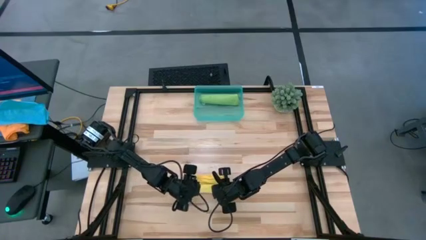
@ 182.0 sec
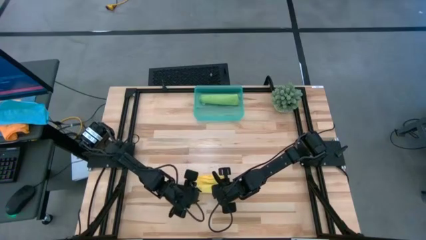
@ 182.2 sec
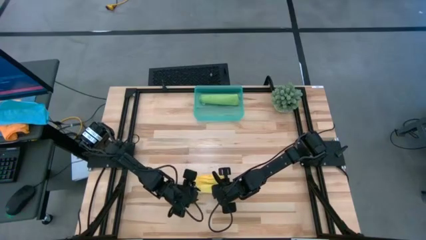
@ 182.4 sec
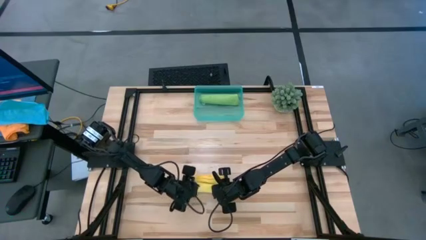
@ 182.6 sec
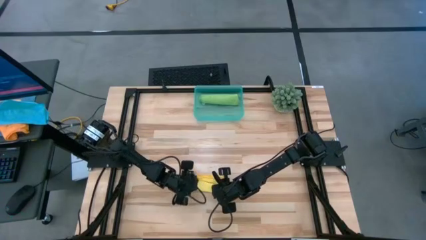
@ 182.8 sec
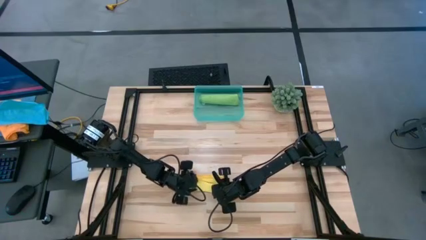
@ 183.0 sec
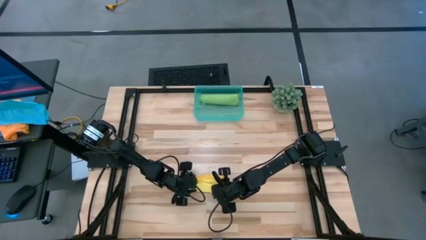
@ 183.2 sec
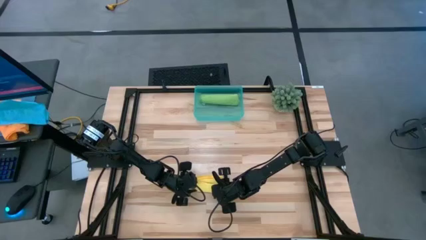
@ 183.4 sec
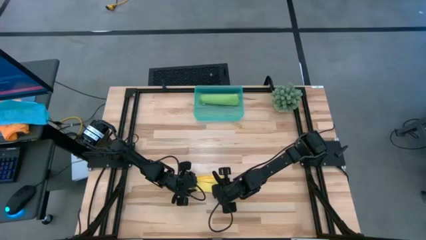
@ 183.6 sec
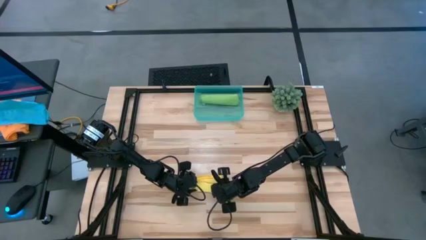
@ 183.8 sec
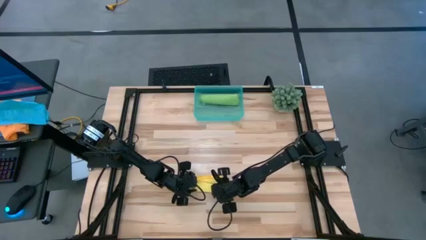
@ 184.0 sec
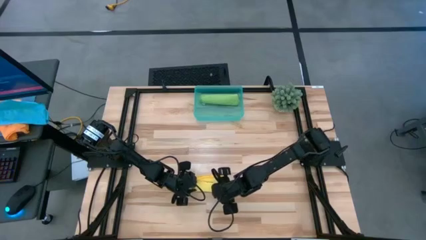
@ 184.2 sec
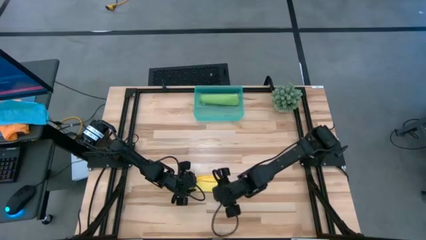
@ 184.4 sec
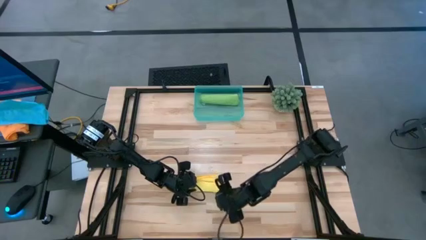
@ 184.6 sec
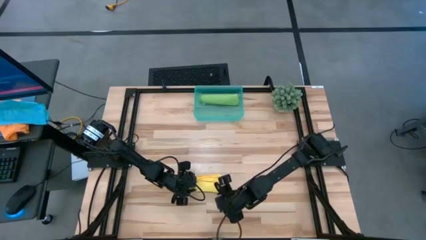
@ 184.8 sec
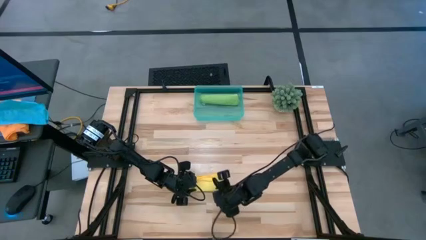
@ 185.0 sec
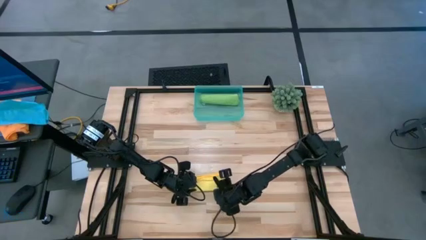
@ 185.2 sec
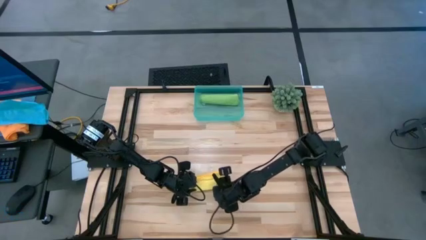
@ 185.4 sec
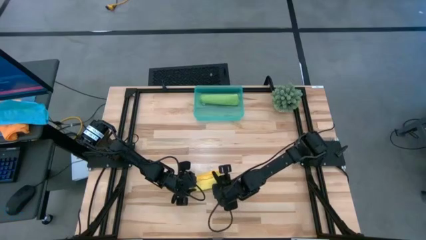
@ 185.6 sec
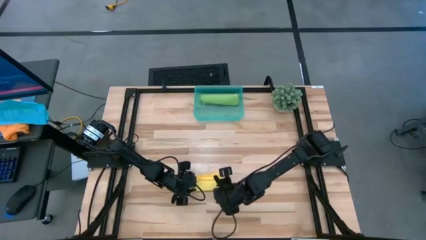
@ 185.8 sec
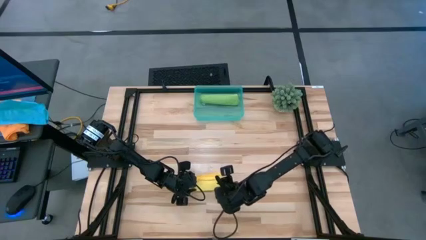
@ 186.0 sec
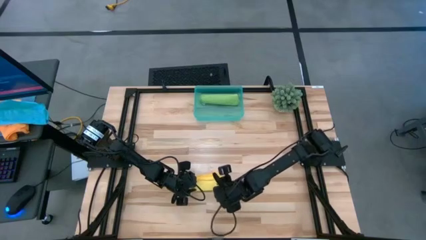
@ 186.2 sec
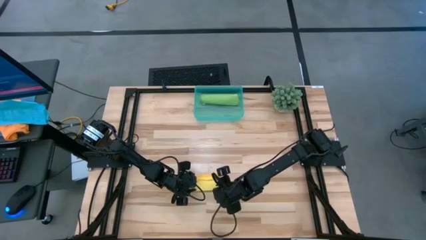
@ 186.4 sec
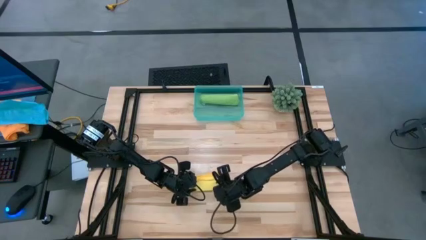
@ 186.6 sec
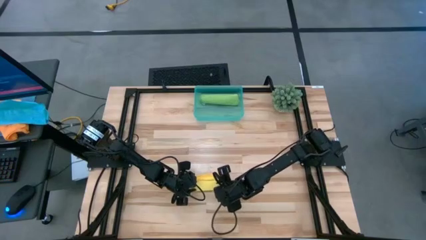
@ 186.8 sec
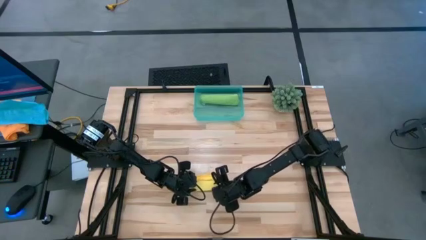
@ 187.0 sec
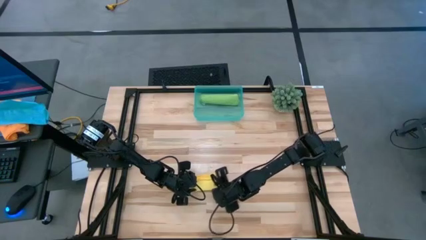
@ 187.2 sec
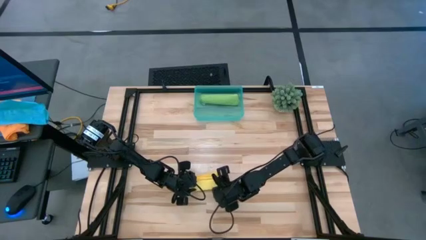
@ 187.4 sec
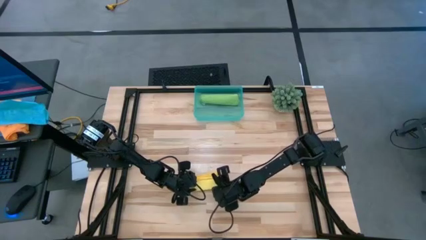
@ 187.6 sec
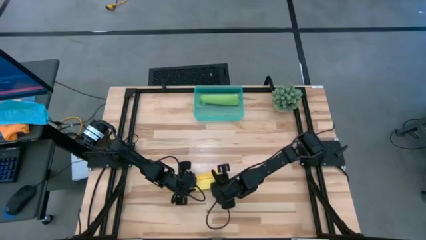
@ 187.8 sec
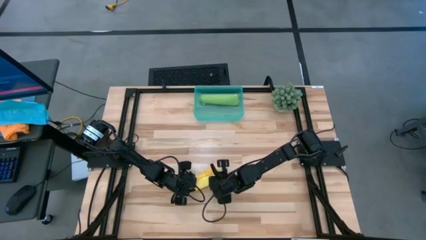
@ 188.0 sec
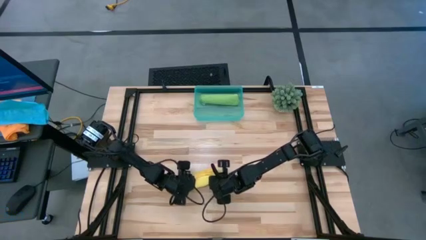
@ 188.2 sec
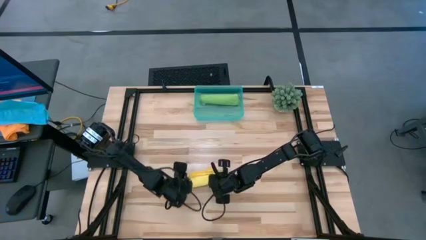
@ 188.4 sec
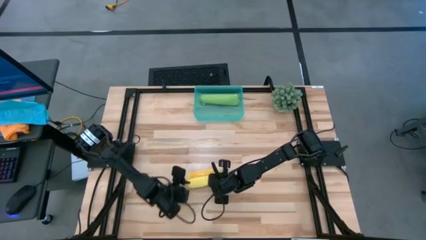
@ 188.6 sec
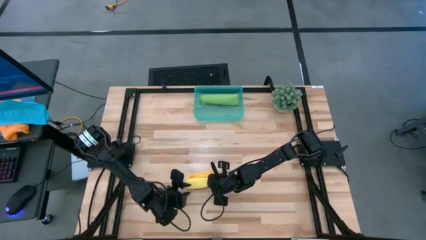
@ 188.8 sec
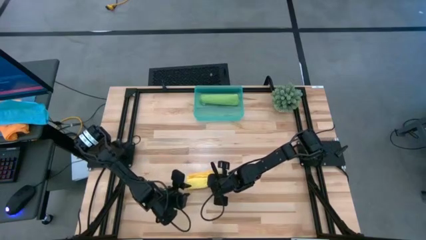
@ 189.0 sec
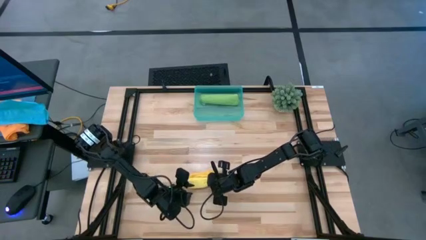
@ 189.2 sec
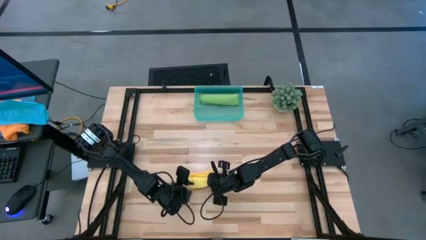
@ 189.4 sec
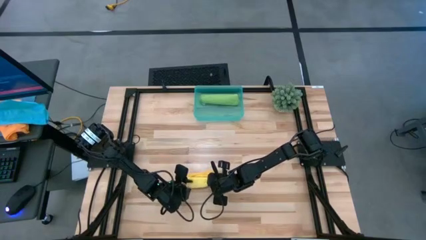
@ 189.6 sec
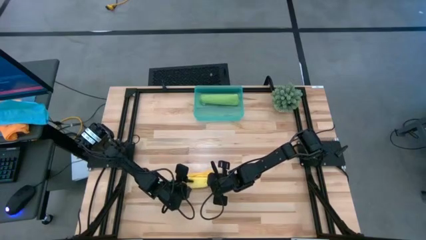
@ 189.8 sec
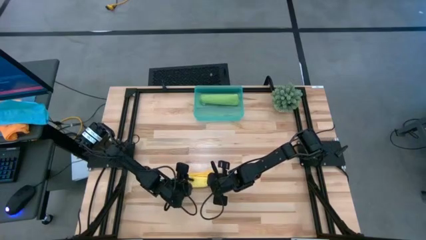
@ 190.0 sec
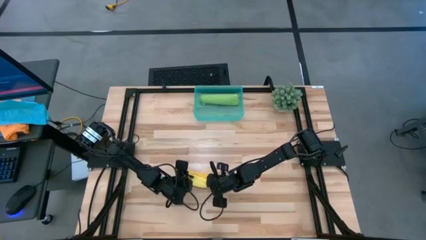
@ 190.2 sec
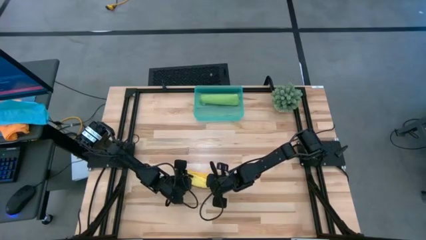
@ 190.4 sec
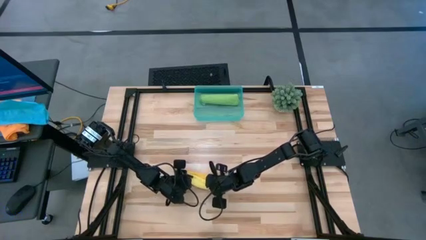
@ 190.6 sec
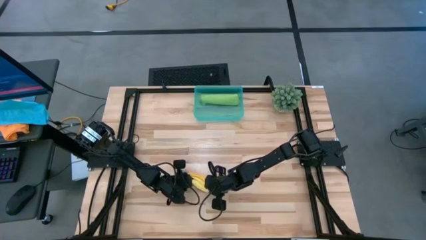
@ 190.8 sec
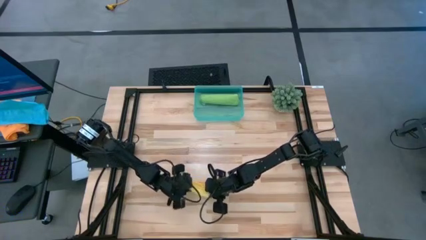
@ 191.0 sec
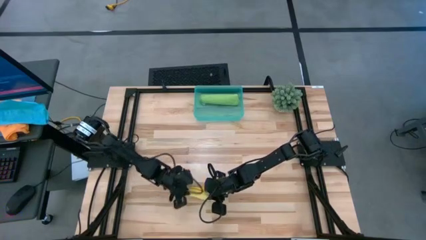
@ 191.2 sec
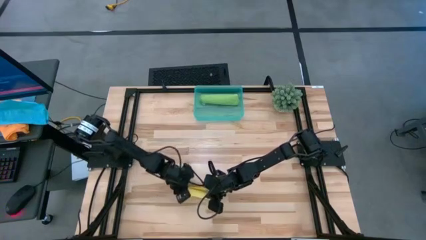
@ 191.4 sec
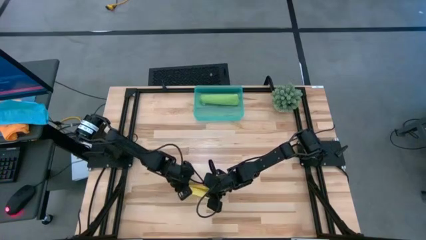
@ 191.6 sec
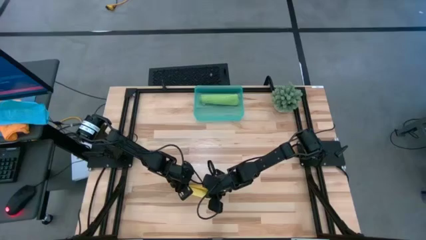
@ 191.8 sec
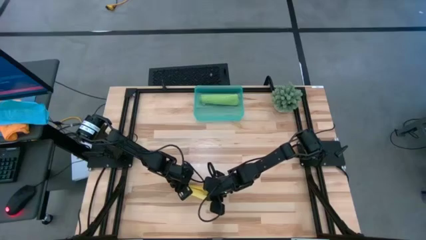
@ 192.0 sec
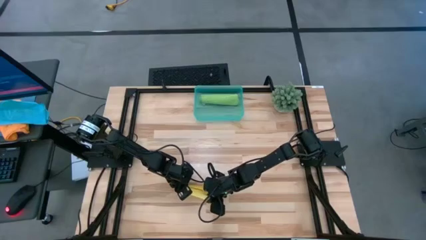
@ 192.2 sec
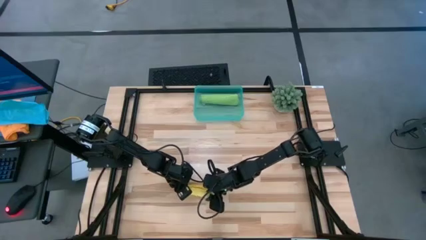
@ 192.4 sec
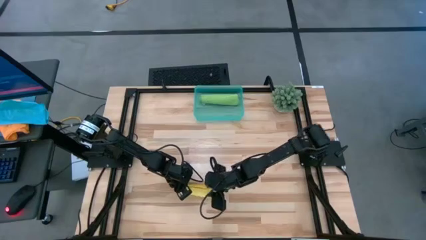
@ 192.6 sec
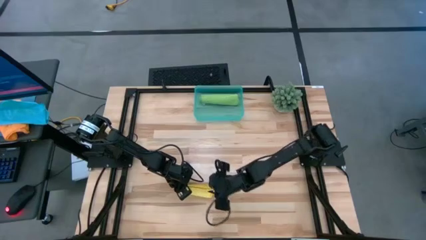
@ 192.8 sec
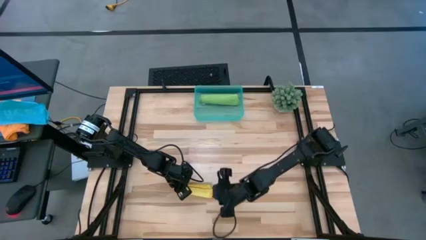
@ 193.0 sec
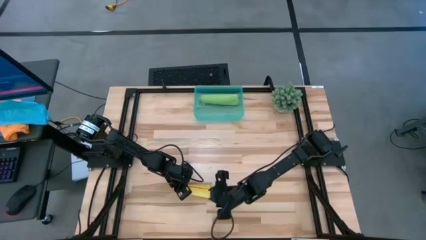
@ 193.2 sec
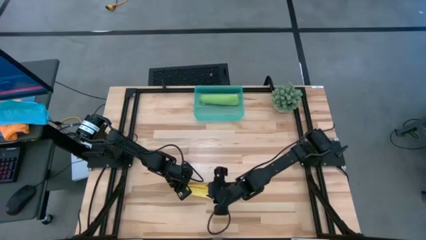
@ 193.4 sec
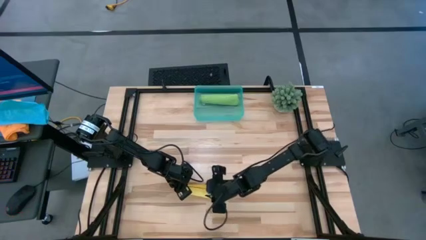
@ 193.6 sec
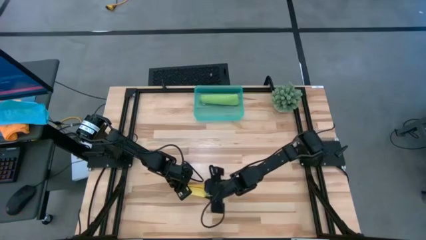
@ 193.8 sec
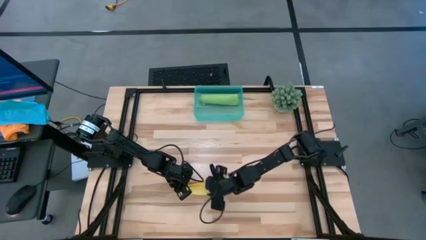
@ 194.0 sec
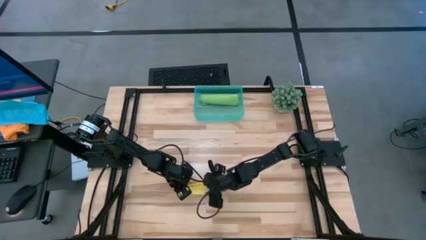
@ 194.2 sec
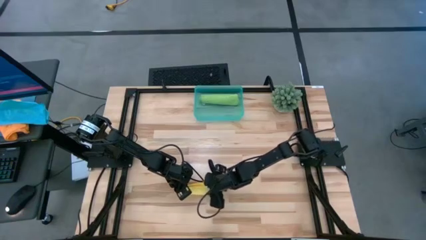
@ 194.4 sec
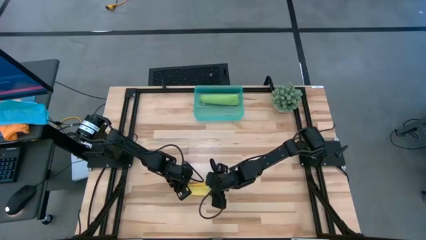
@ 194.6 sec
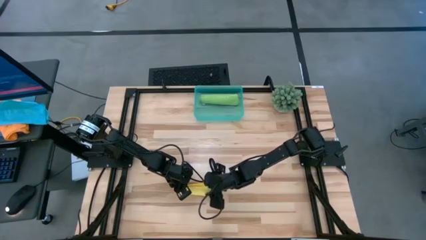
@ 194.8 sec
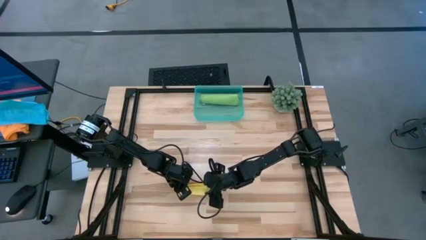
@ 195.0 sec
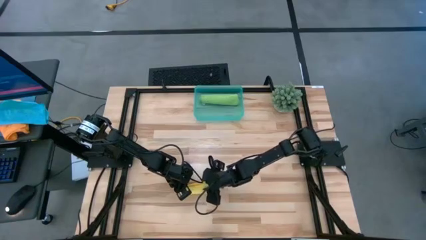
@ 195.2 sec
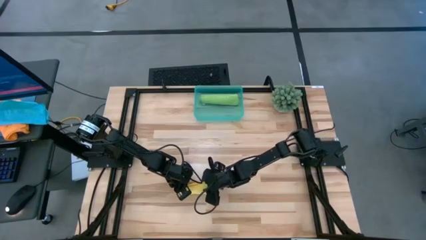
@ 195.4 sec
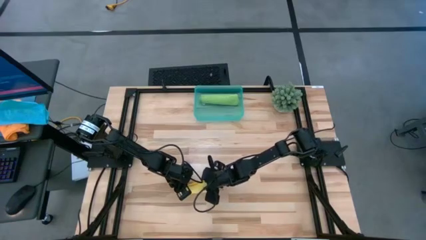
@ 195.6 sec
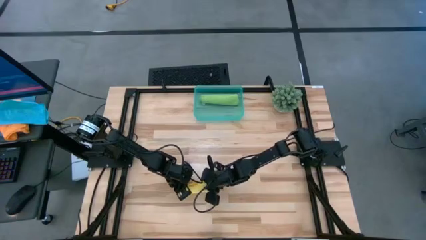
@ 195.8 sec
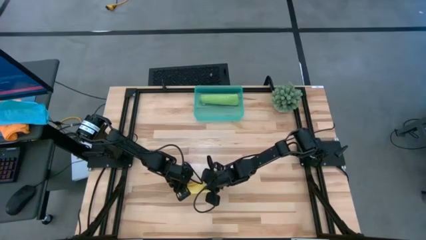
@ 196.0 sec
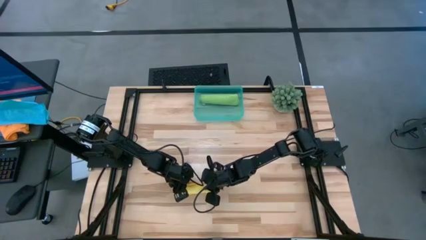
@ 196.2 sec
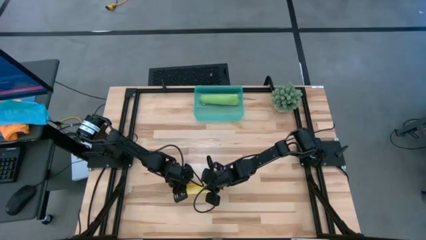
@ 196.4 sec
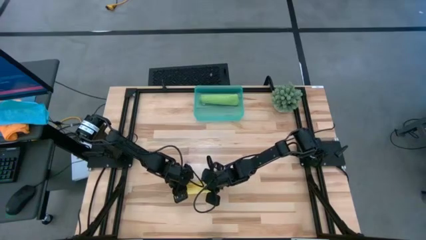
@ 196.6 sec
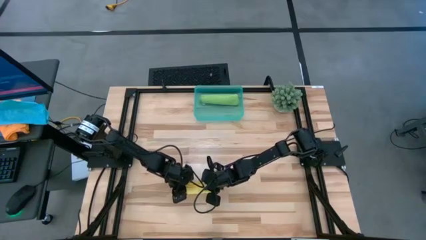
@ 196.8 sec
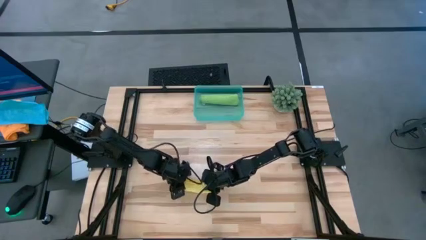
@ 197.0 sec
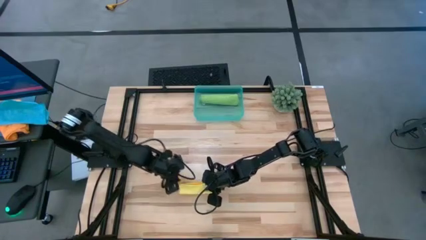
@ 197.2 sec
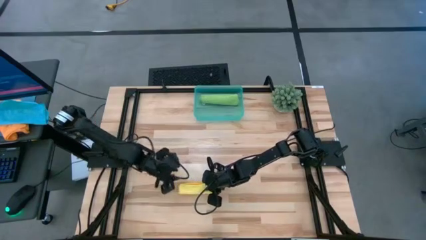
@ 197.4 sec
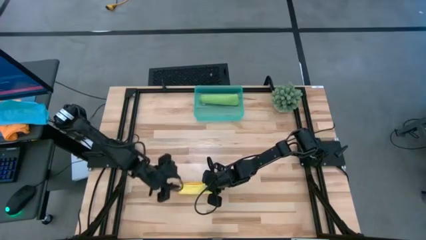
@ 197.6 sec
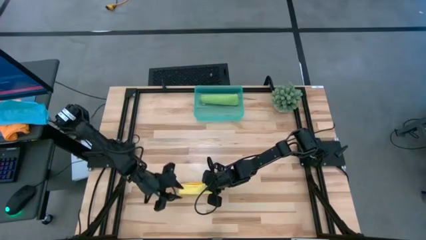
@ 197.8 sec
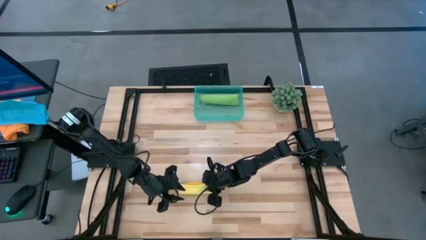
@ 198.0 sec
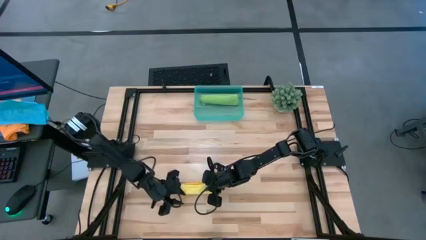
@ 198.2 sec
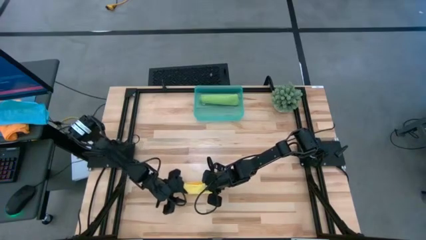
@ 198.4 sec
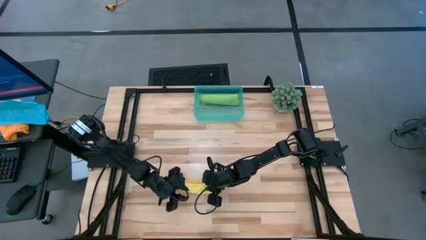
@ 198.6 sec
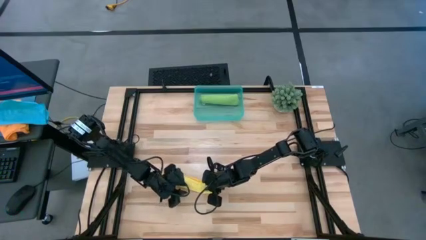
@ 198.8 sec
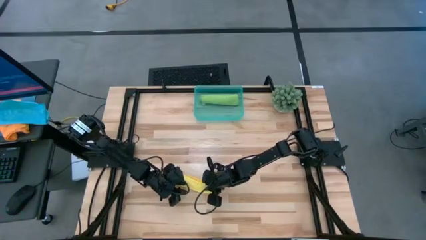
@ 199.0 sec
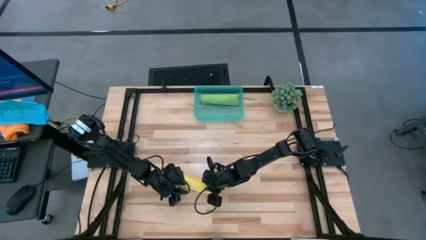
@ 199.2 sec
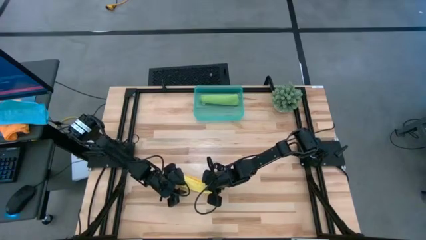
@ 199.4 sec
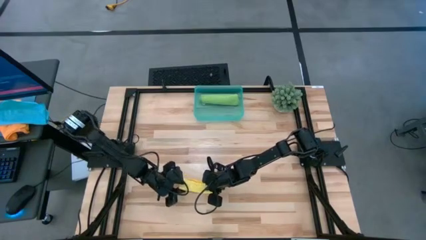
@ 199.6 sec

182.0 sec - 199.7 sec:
Task: Roll microfiber towels into tight, uniform cylinder then place into a basket
Roll the yellow towel
